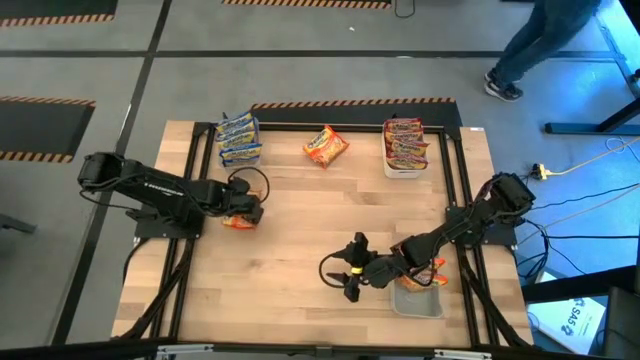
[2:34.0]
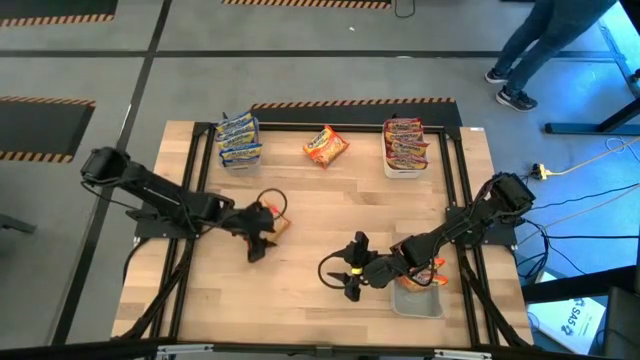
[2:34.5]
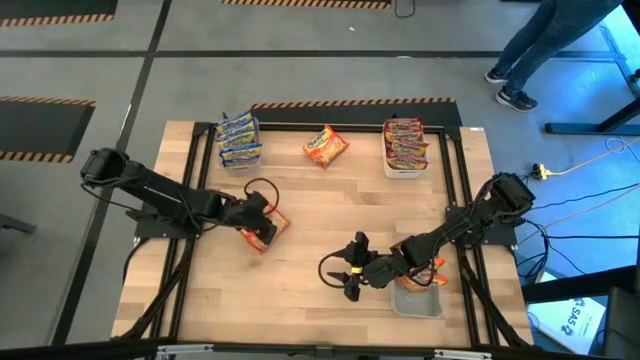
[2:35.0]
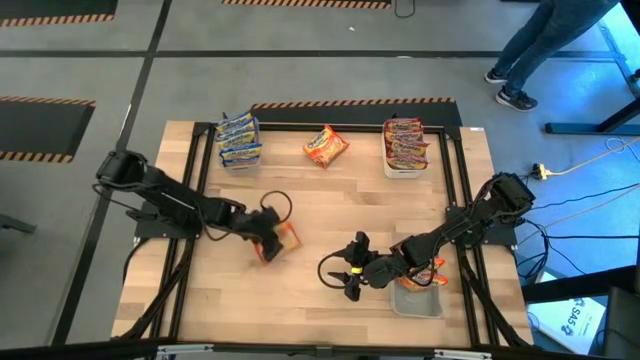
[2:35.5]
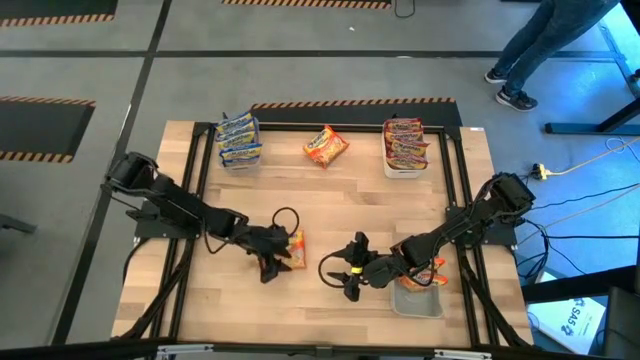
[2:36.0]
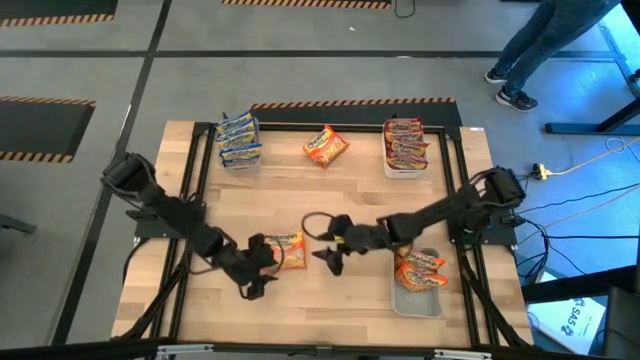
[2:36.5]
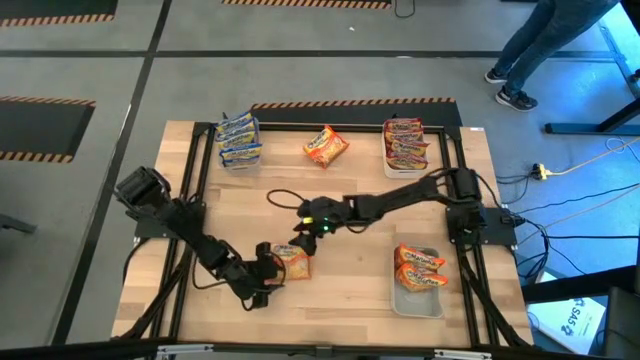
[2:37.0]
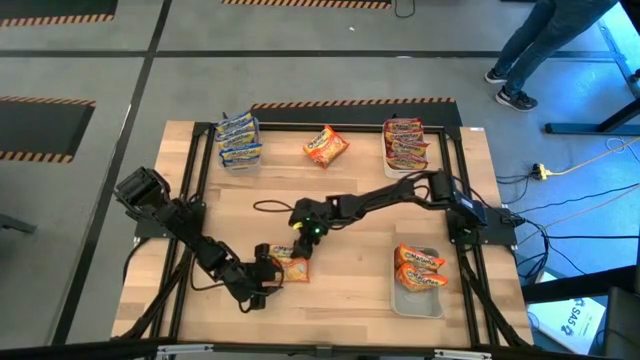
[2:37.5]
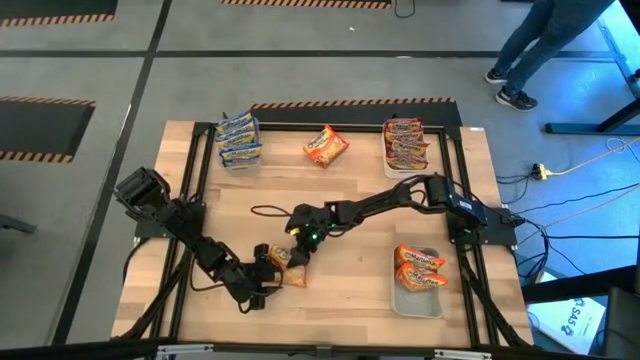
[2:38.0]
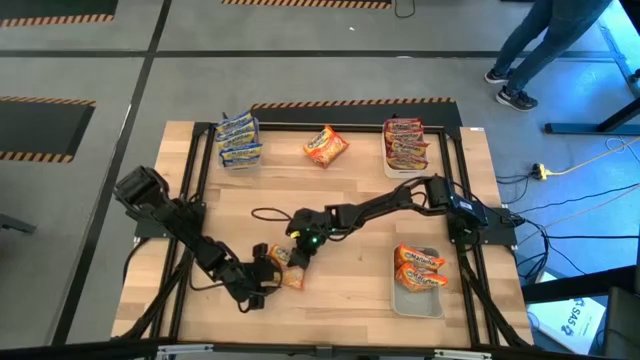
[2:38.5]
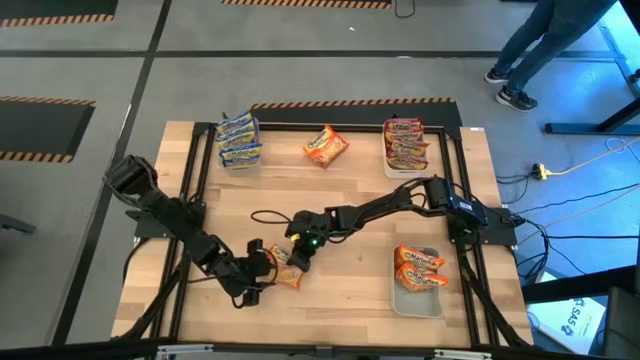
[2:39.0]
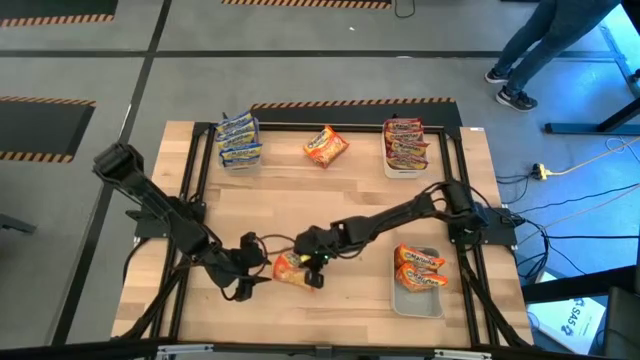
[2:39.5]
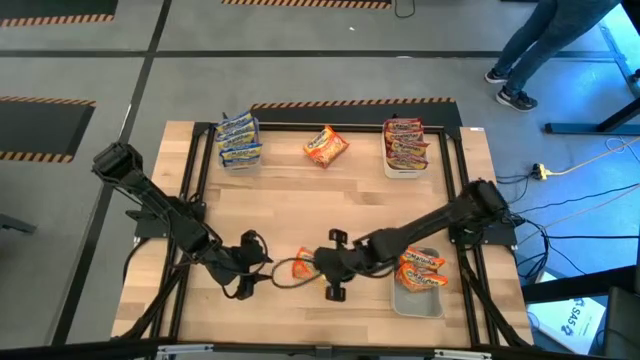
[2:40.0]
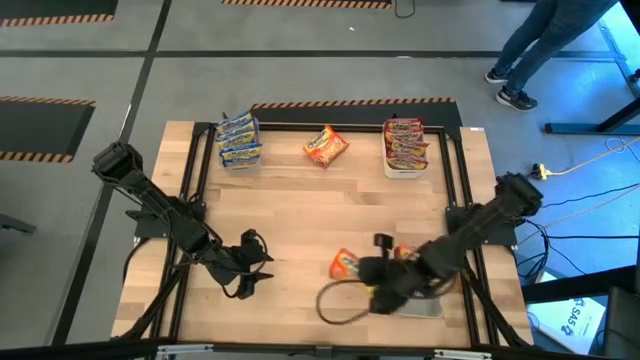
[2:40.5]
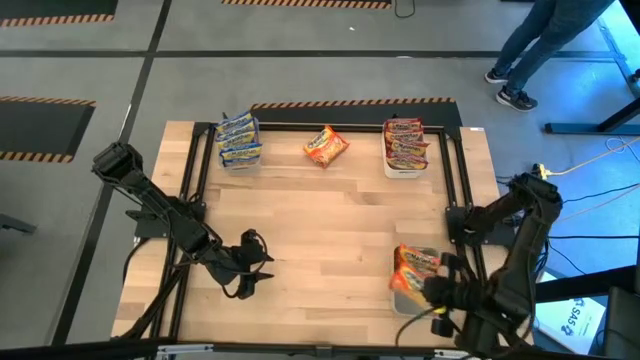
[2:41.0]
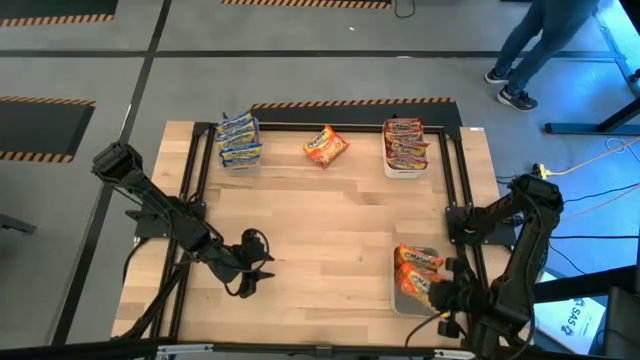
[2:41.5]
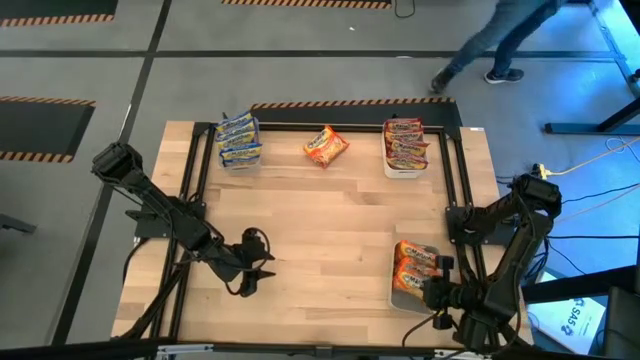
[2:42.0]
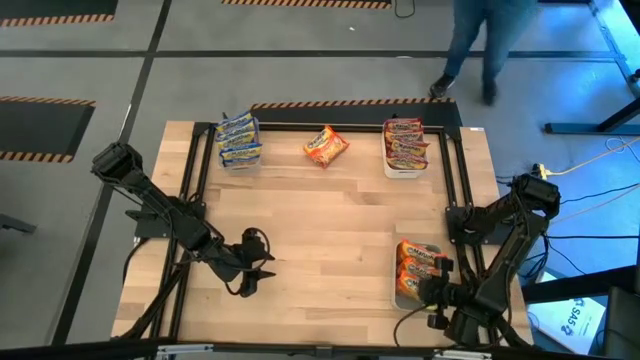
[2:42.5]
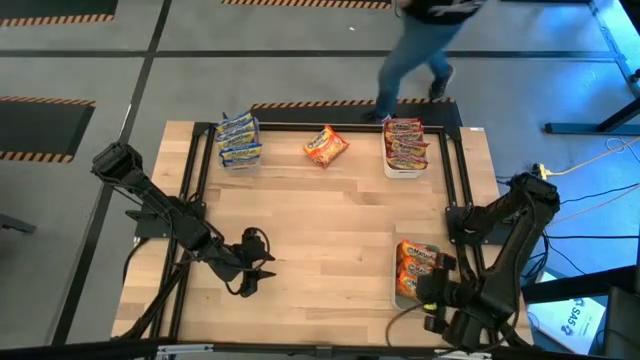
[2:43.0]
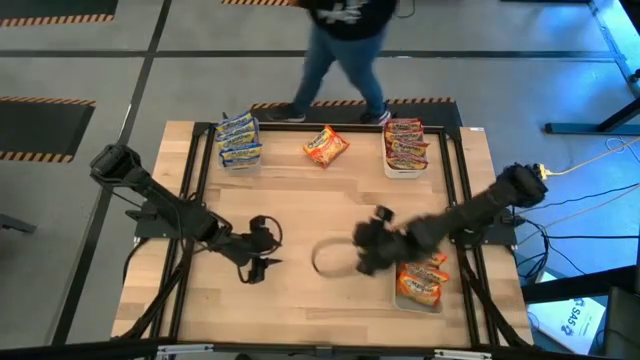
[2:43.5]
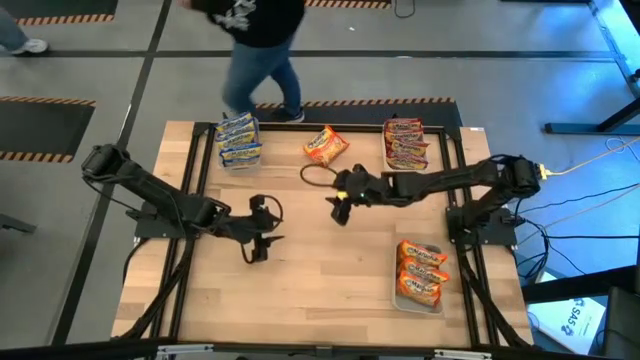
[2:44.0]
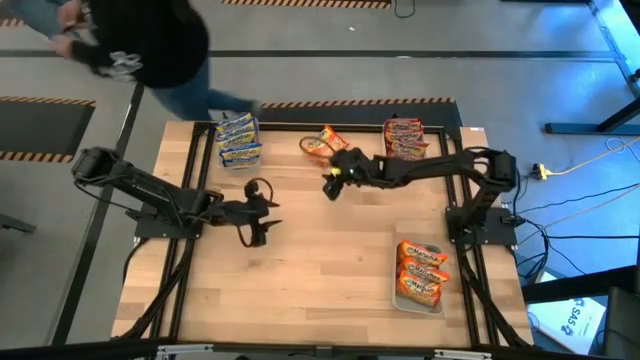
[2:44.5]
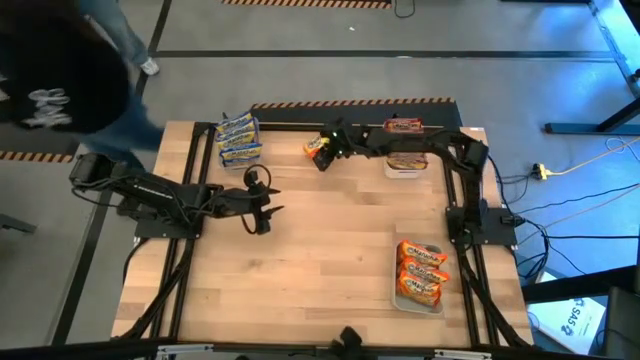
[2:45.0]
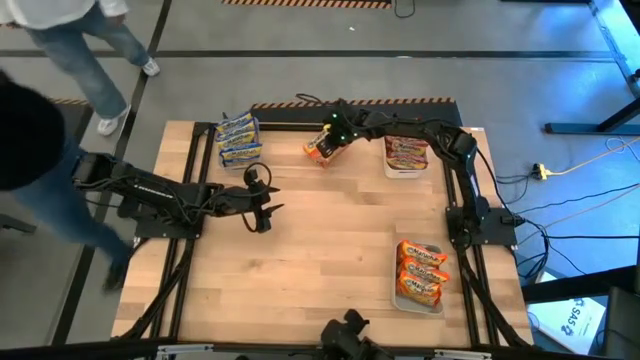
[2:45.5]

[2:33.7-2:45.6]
Task: Sort Maruchan noodles
Put the bottom orange noodle pack into the gray bin

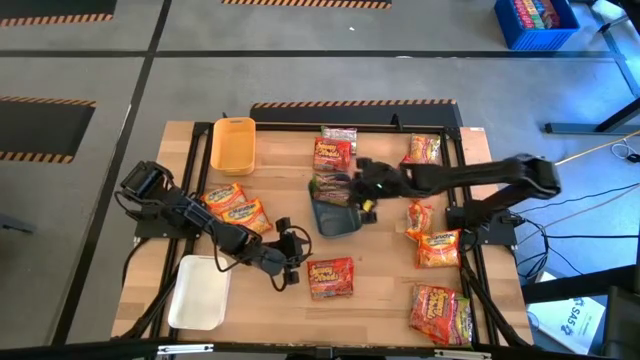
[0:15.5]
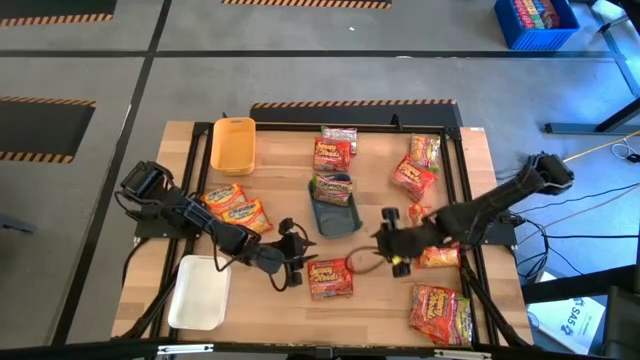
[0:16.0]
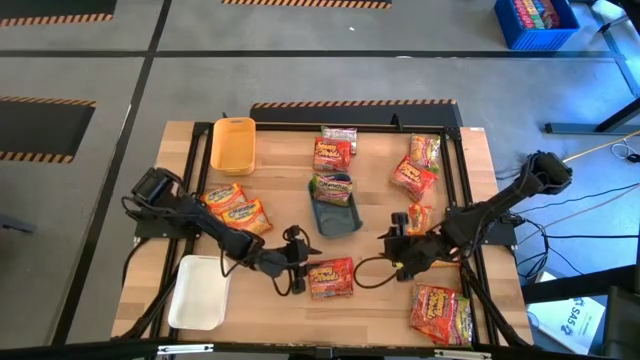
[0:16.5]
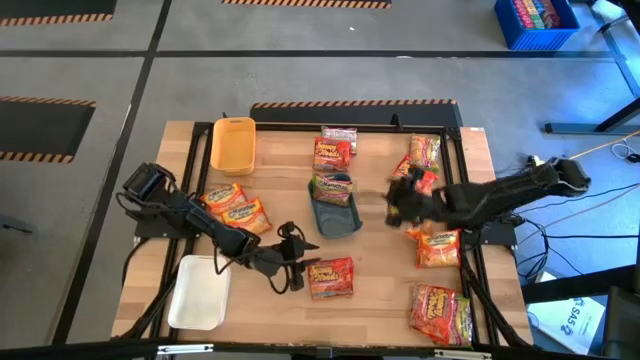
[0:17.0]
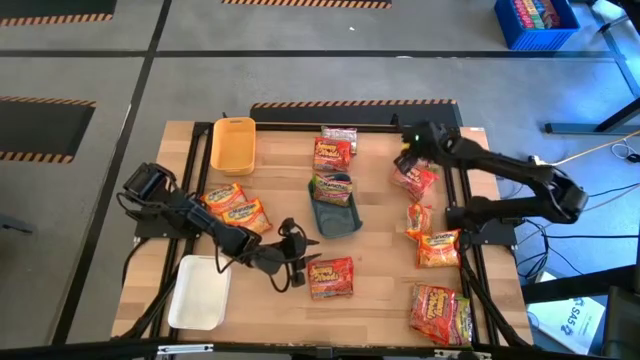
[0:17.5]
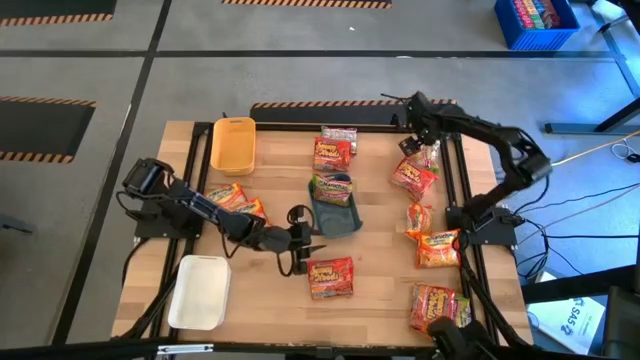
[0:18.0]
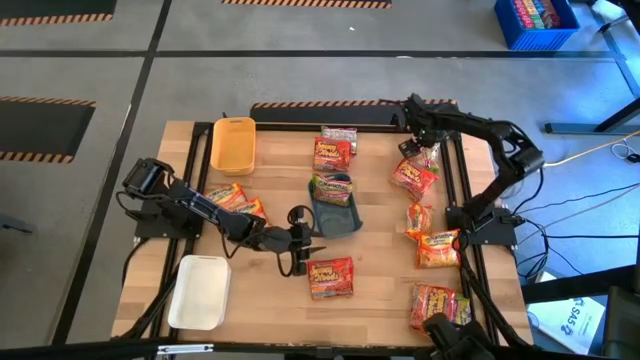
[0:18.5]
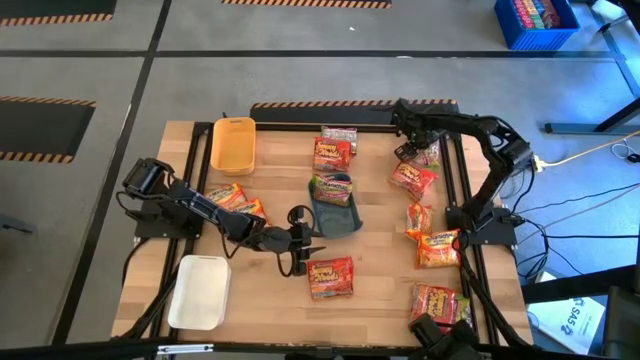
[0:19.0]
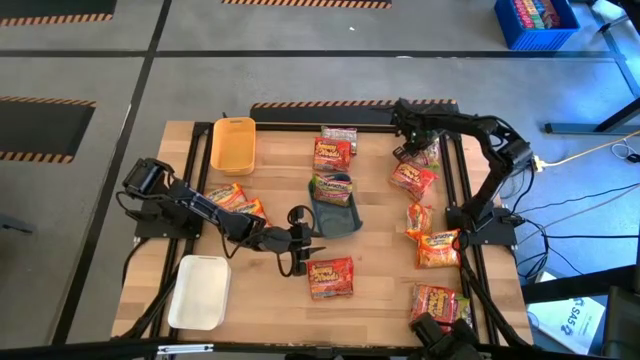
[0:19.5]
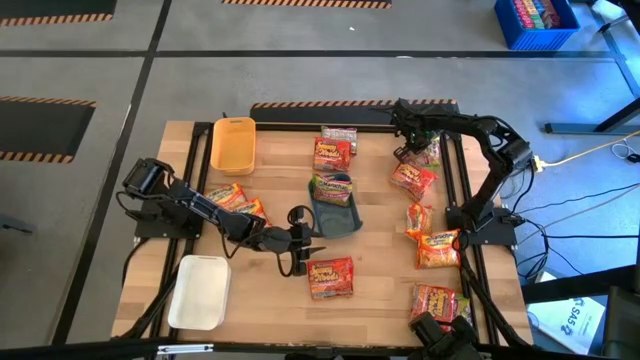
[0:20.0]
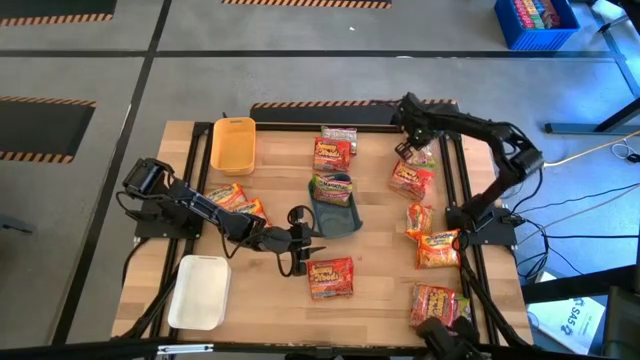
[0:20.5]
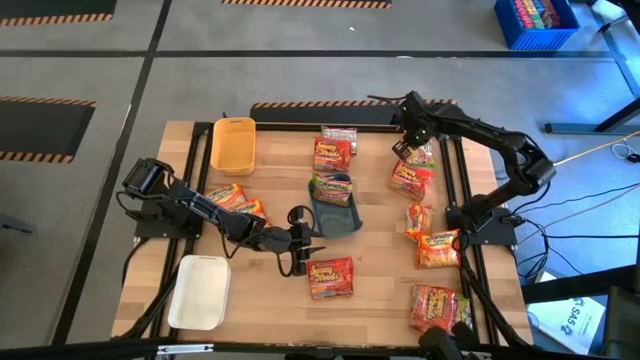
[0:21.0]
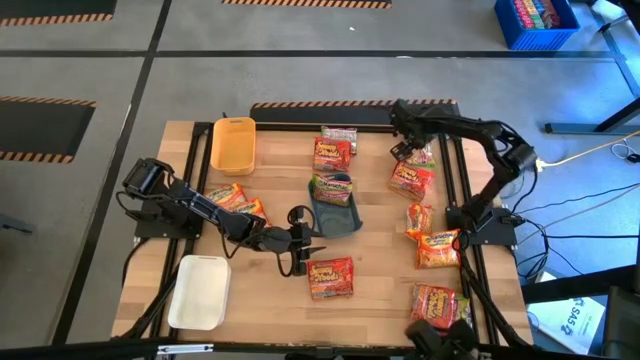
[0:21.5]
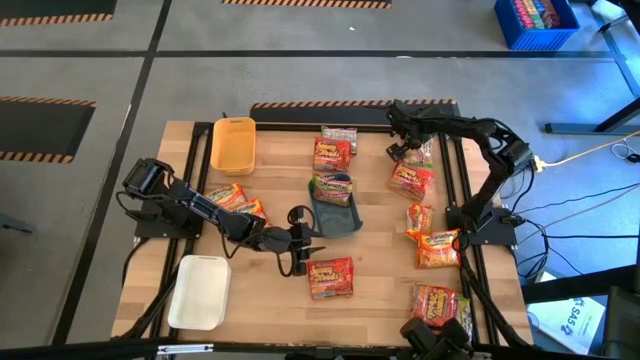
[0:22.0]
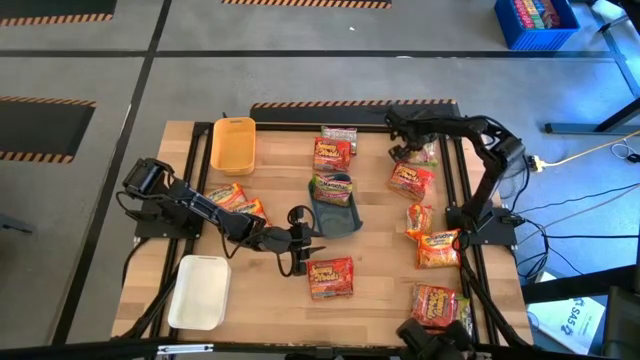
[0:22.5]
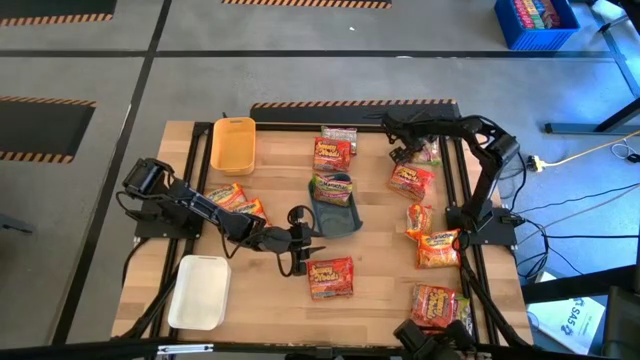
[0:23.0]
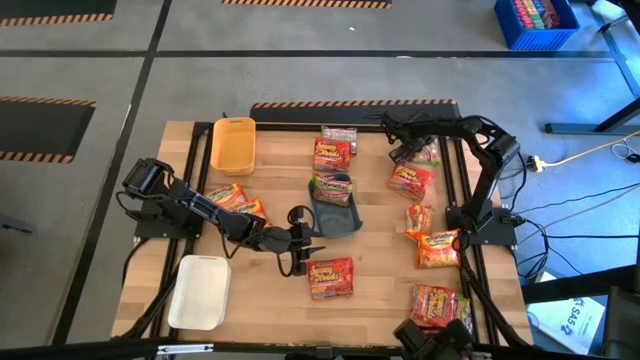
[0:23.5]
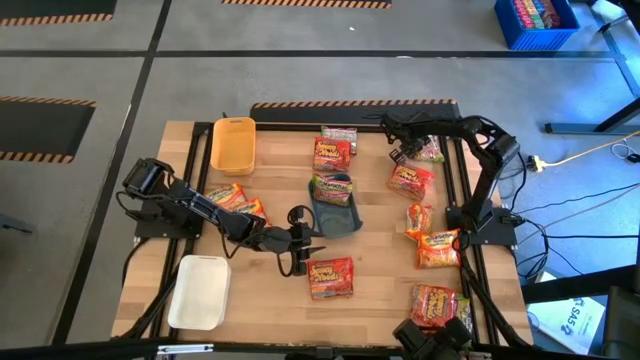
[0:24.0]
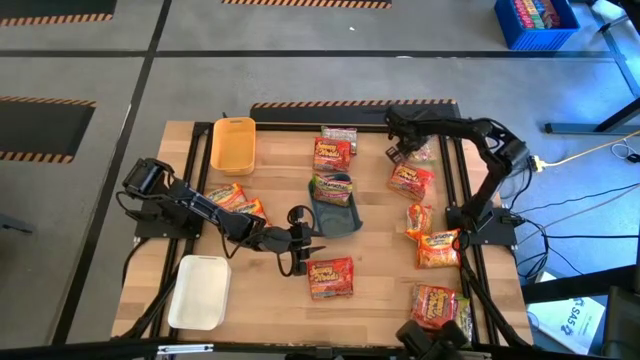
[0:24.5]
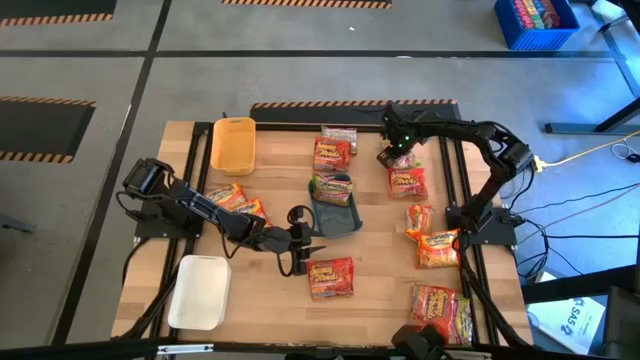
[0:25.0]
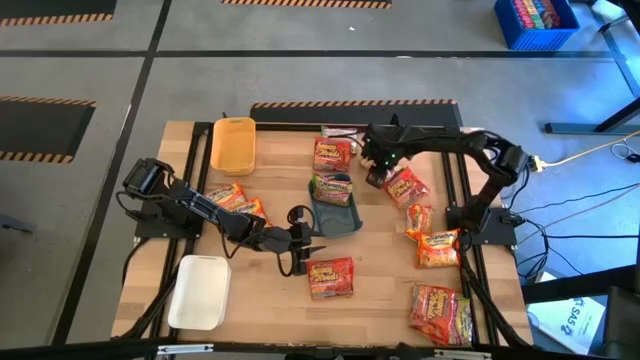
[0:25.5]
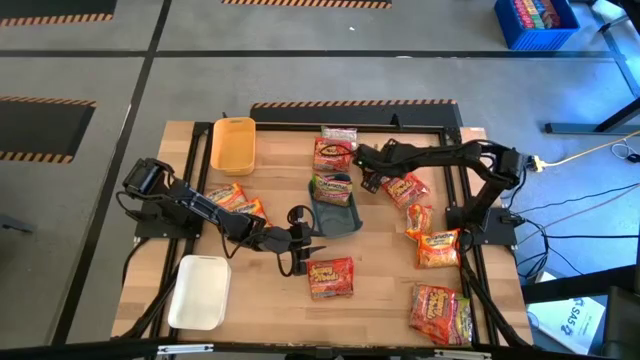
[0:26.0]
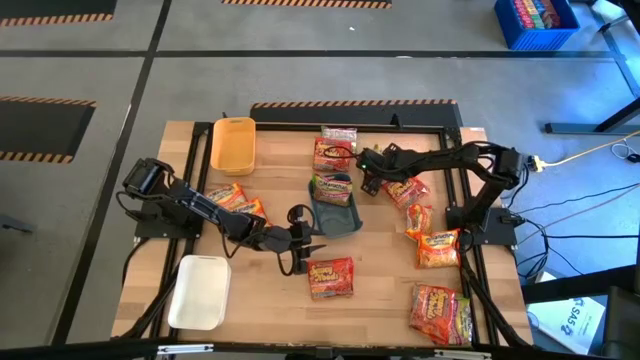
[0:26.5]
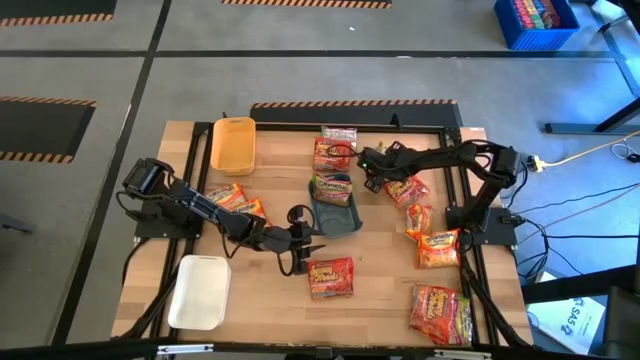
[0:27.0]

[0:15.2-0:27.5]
Task: Sort Maruchan noodles
Put the green noodles into the blue bin
